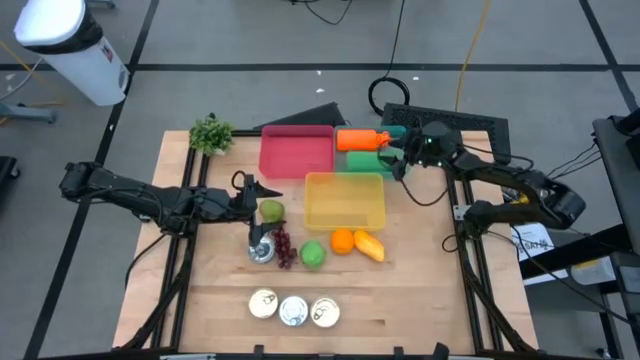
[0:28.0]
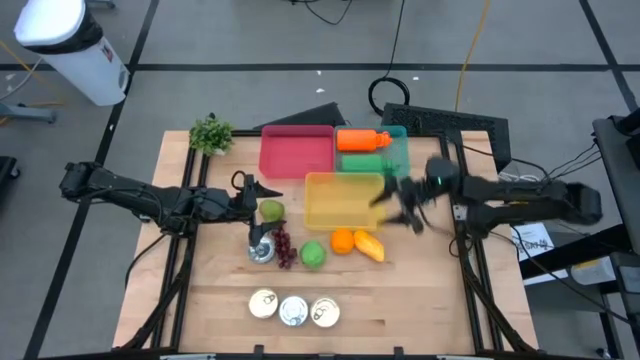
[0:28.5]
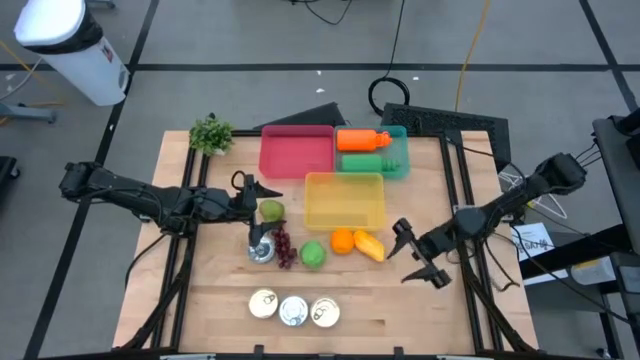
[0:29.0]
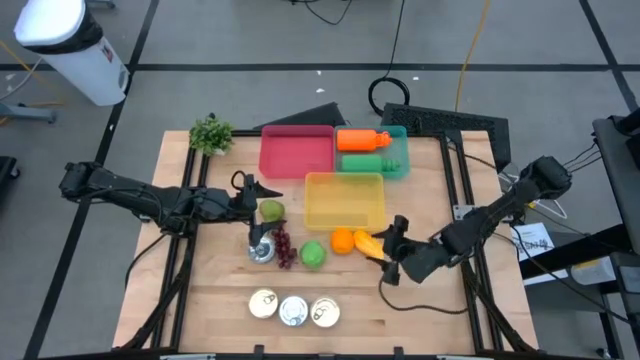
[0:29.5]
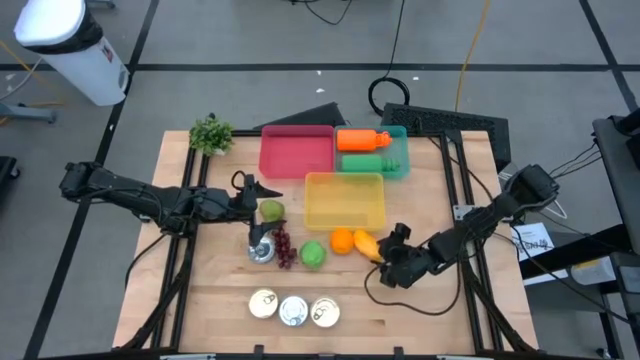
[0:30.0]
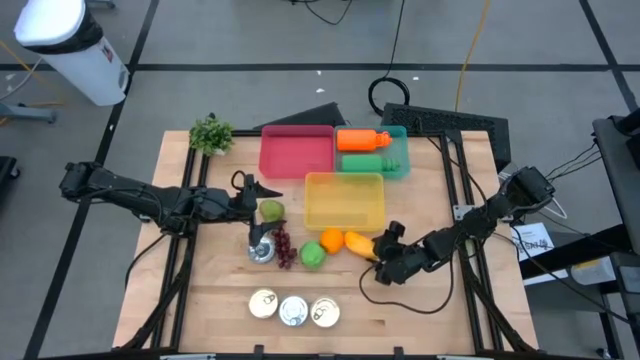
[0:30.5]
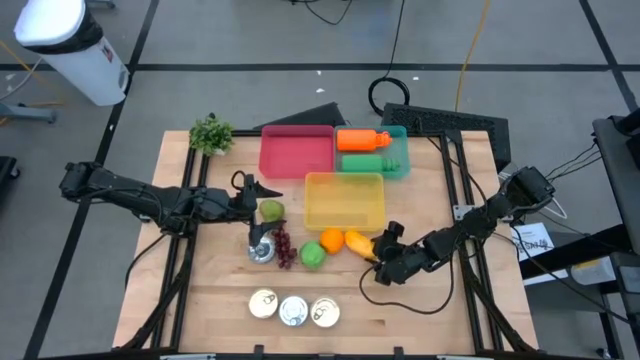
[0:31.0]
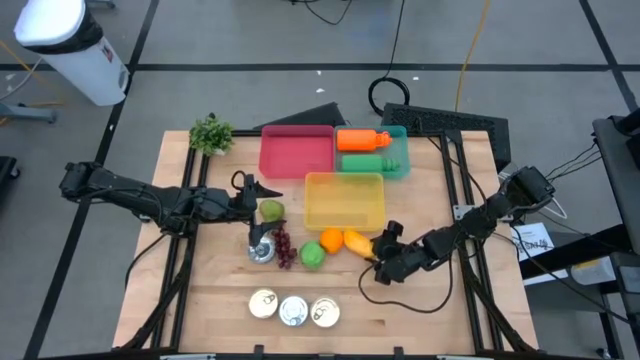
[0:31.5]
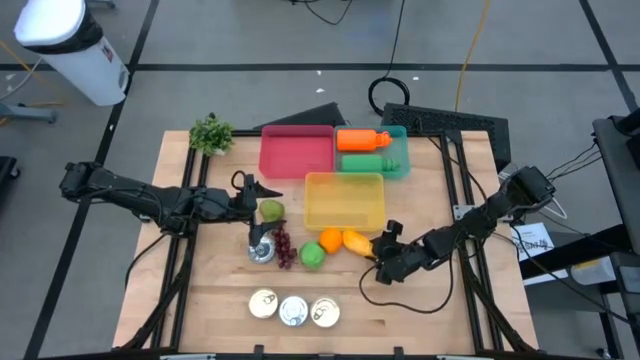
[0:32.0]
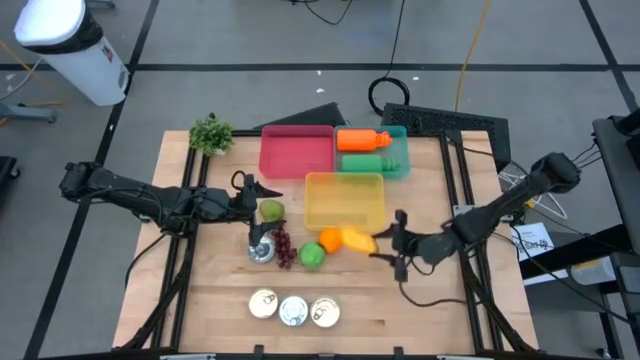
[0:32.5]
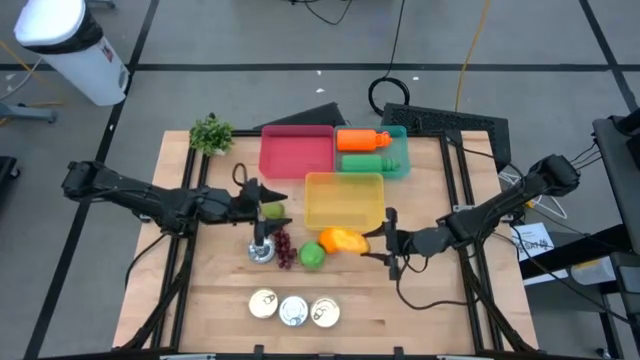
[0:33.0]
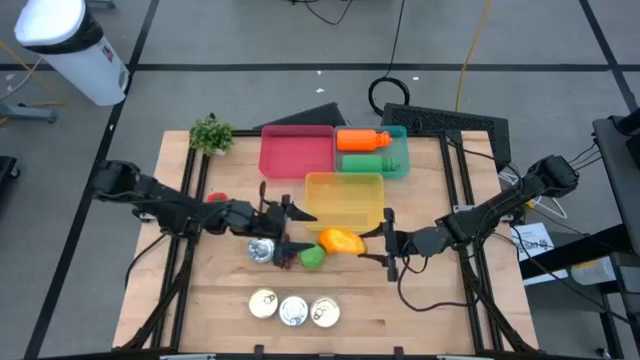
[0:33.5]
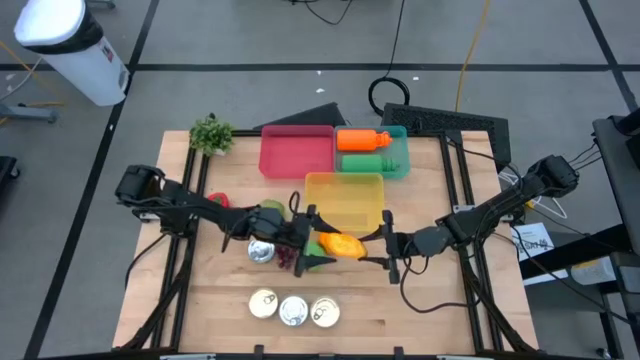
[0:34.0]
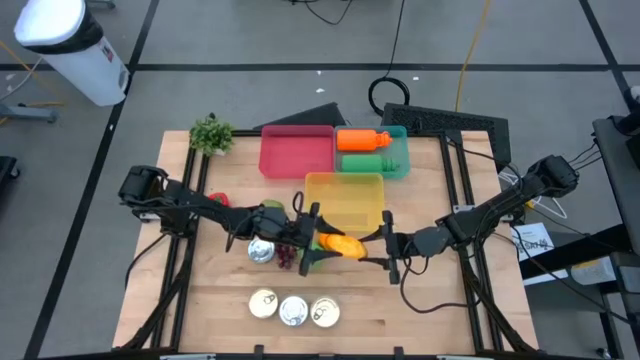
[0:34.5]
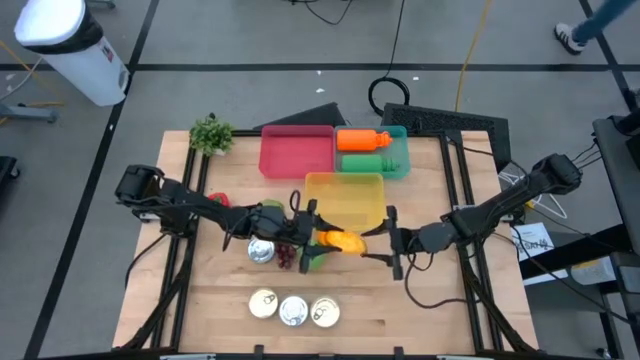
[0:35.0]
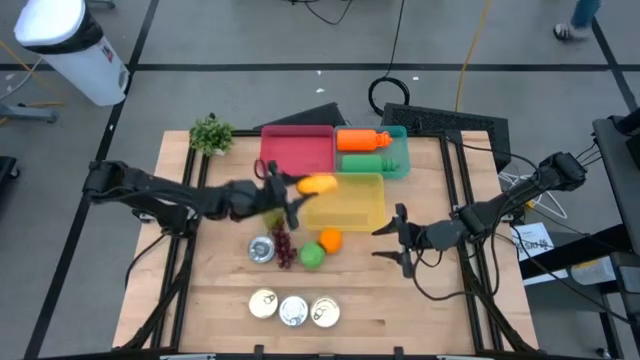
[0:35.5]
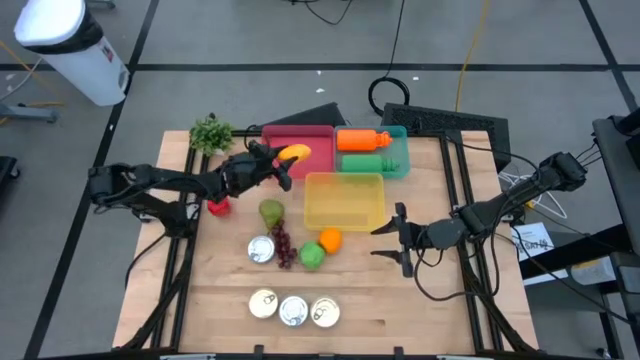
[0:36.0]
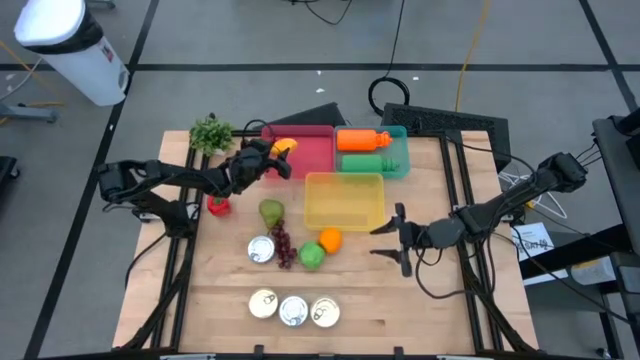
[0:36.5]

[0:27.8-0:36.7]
Task: Pick & Place Food Item
Put the yellow mango into the red bin

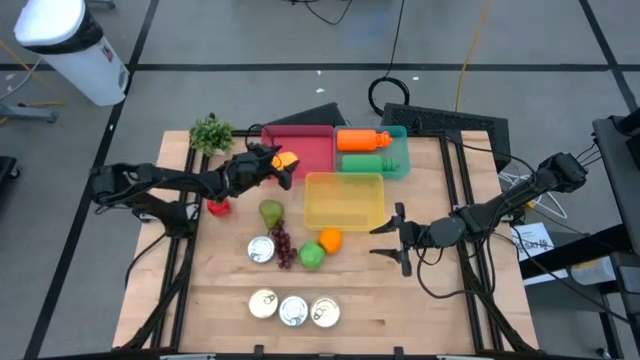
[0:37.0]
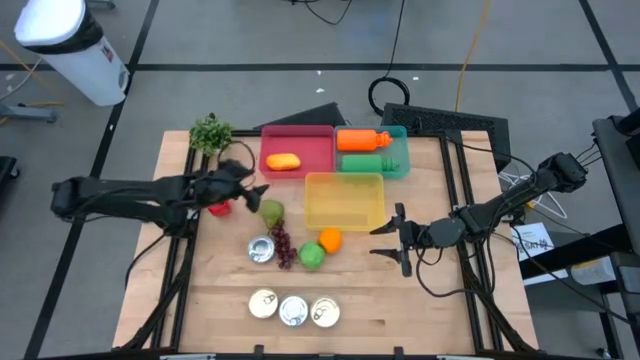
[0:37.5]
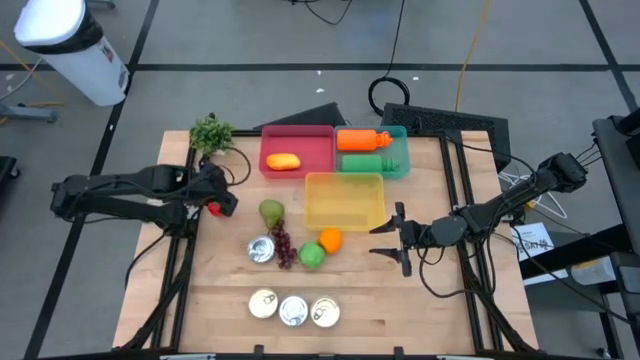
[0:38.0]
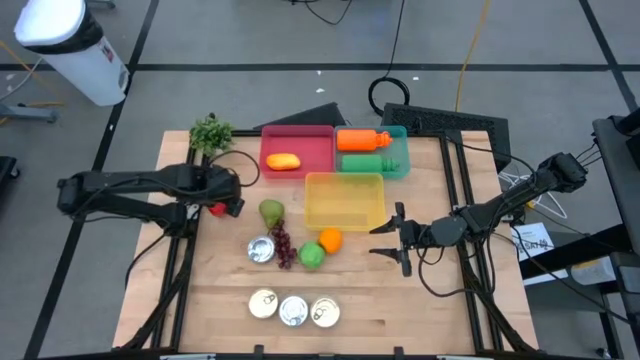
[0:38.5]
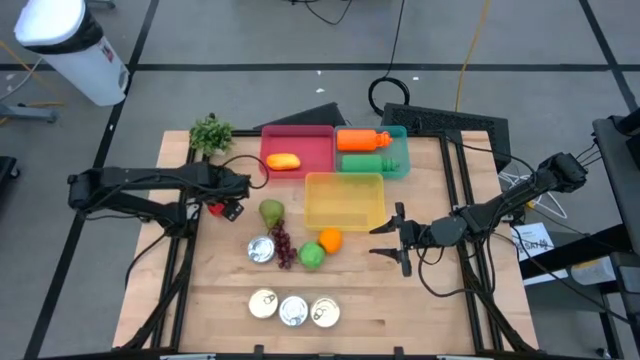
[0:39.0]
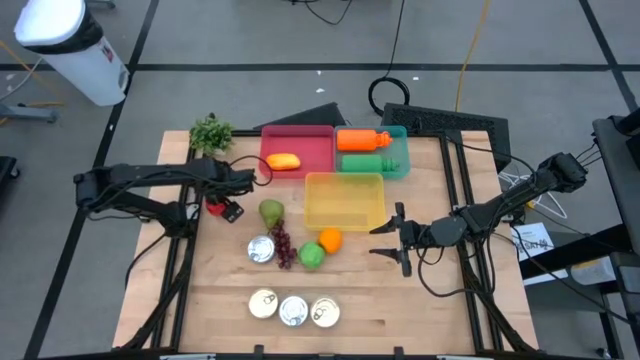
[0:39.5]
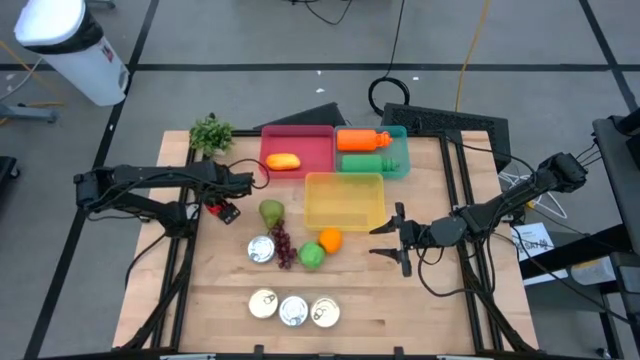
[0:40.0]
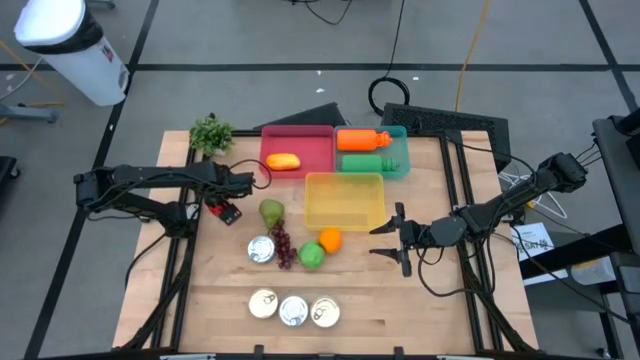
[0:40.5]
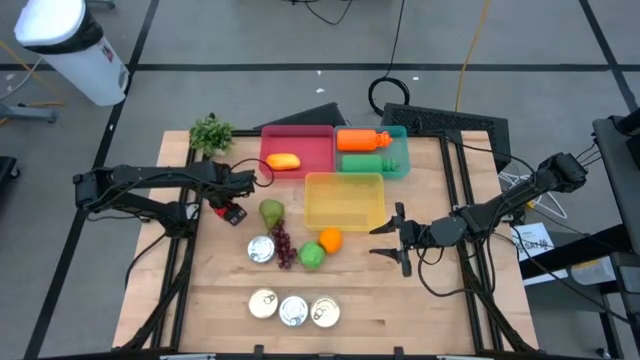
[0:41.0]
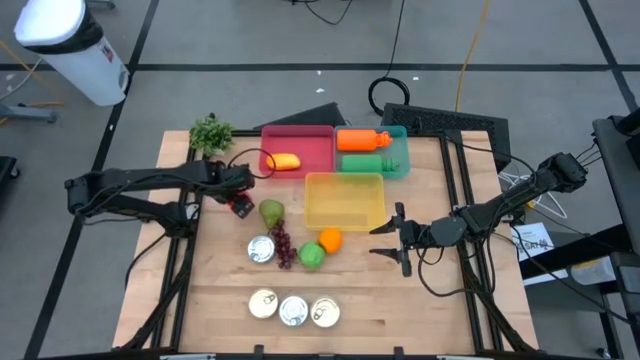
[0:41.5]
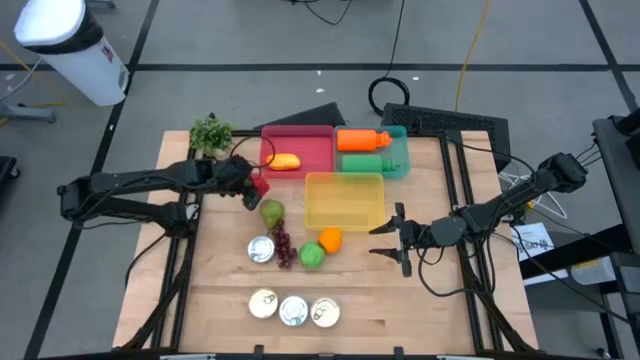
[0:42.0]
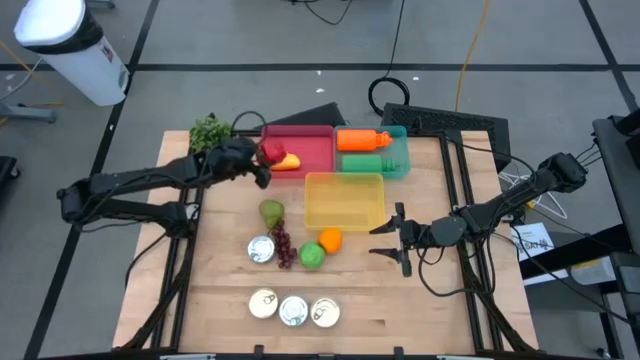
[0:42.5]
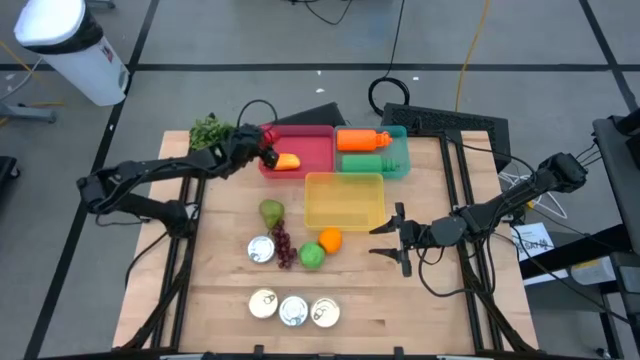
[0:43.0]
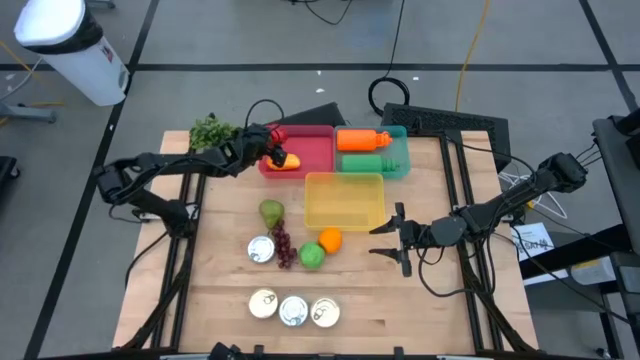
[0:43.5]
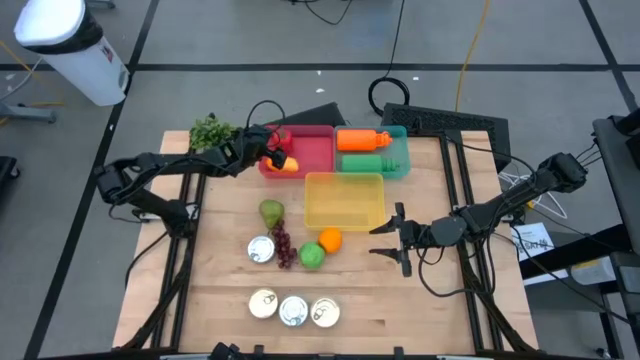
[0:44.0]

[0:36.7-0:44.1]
Put the red bell pepper into the red bin

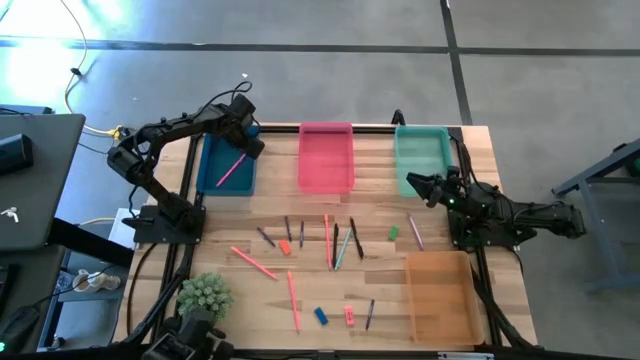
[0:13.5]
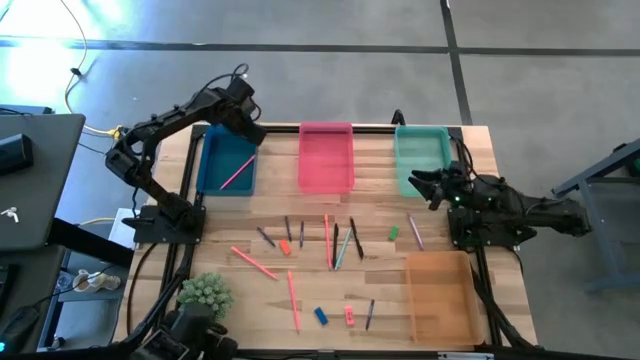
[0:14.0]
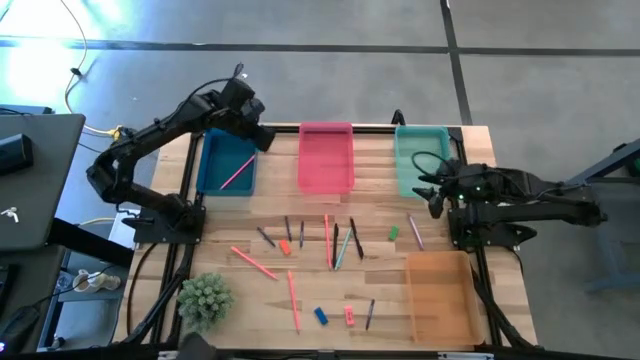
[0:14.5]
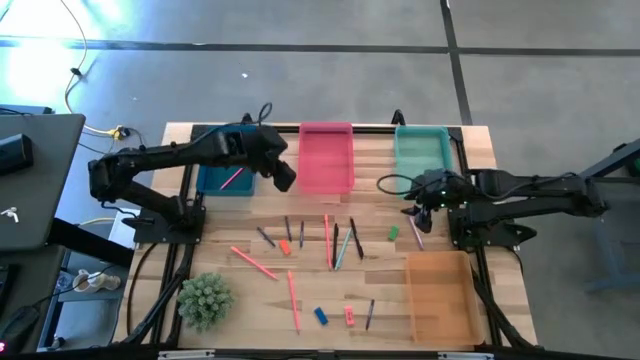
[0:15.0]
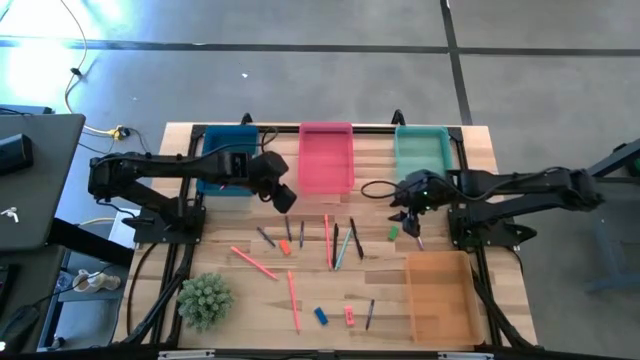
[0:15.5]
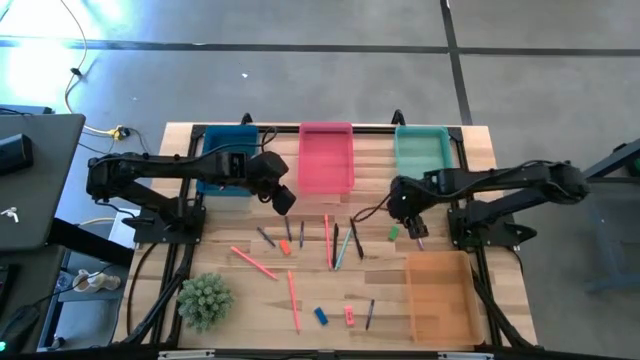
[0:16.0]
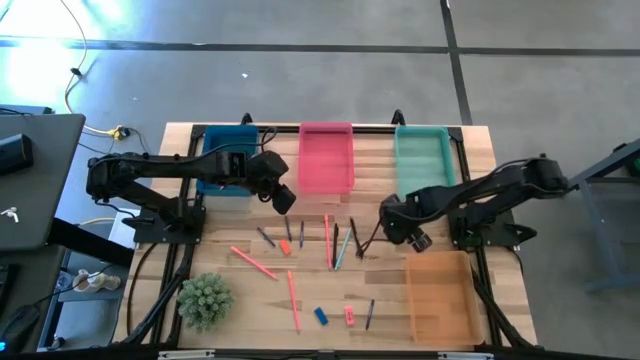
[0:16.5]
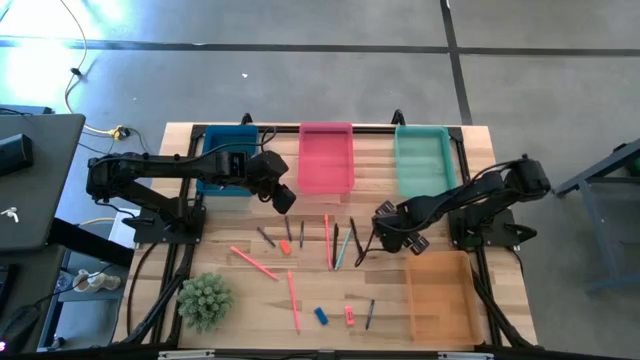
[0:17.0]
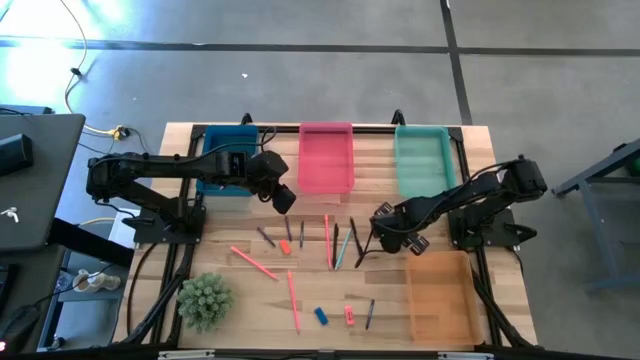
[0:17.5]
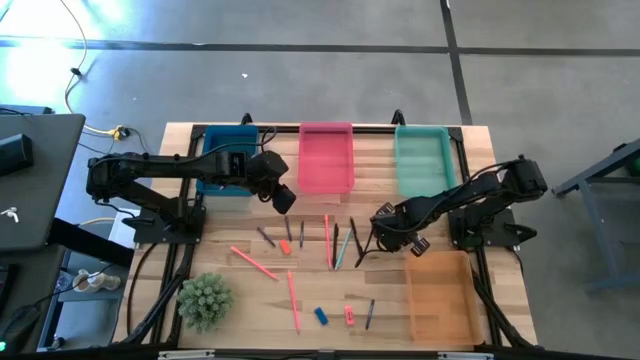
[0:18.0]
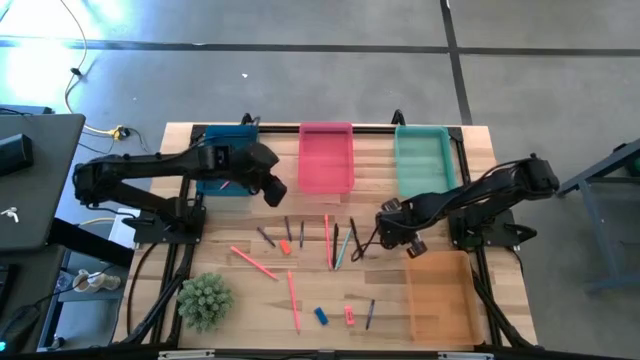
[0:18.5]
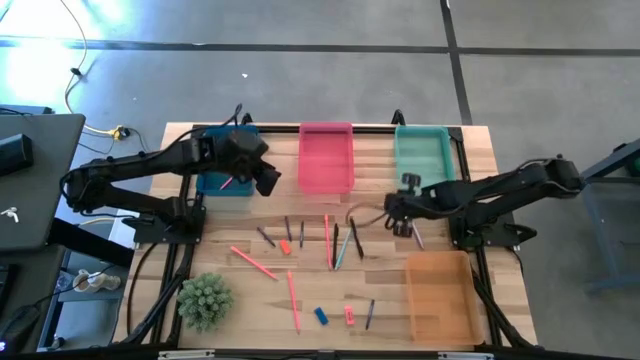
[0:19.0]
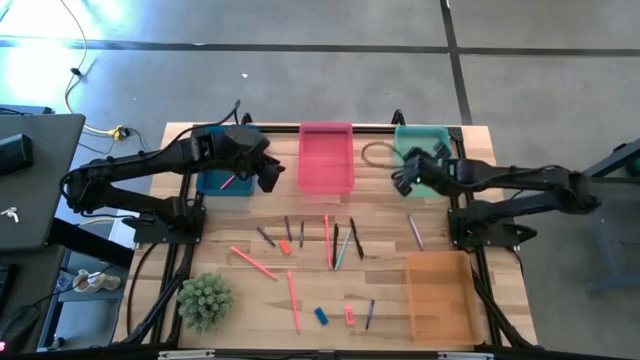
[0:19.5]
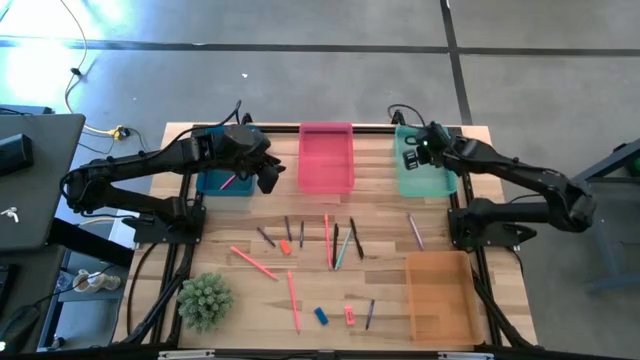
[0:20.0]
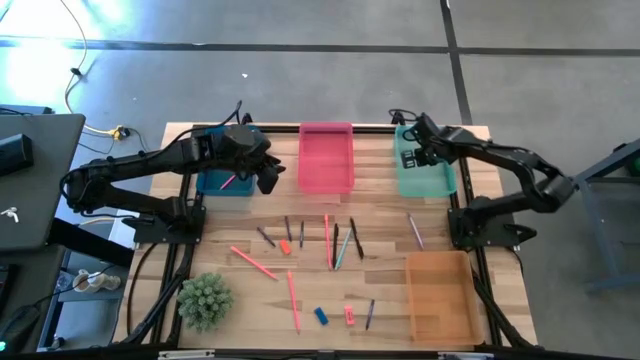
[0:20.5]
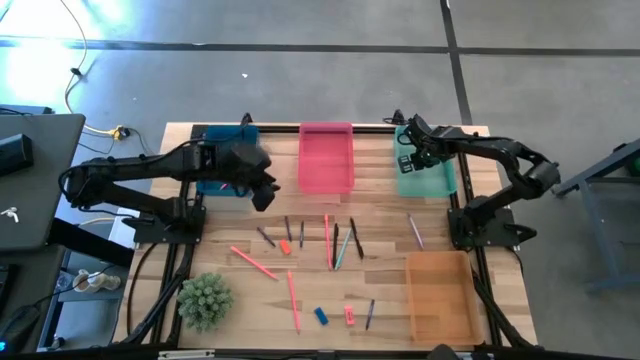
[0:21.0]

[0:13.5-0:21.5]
Task: Sort crayons/erasers/pens/pencils in bins
Put the green eraser into the green bin
